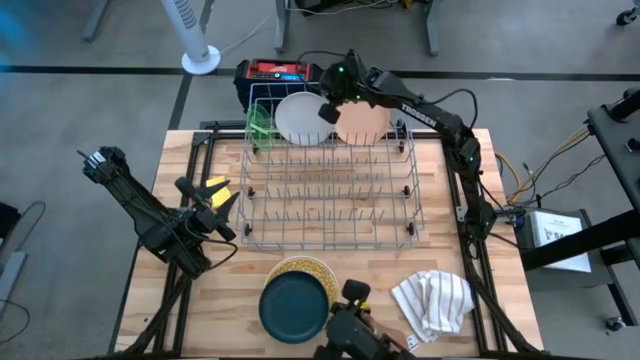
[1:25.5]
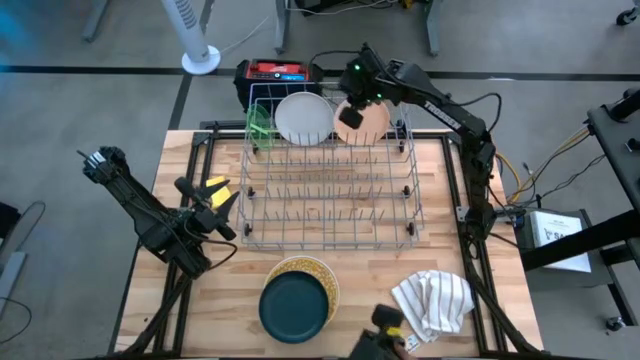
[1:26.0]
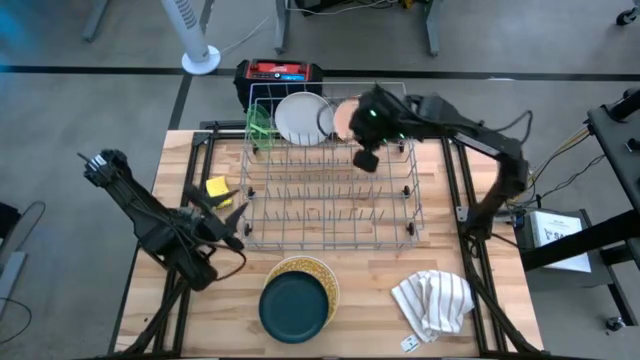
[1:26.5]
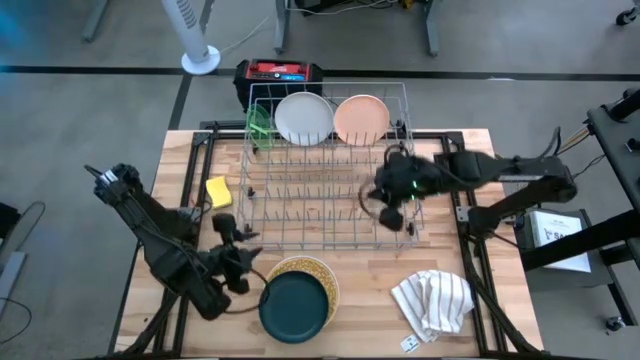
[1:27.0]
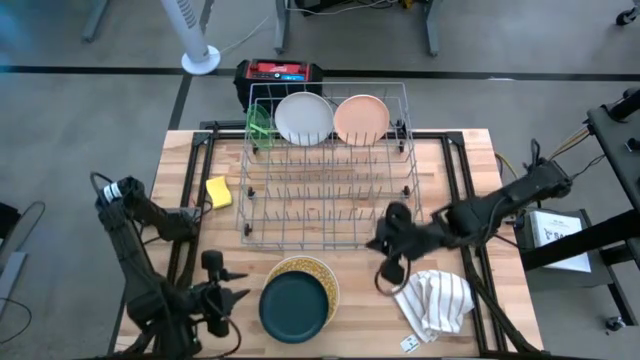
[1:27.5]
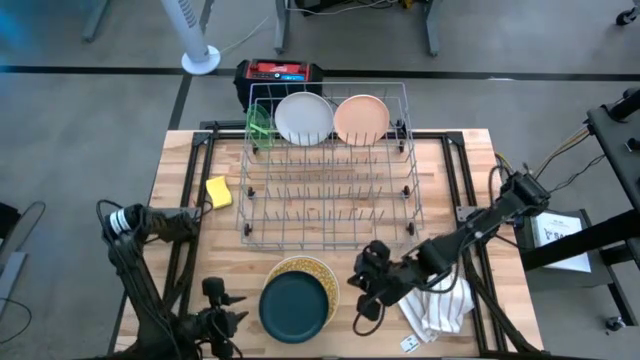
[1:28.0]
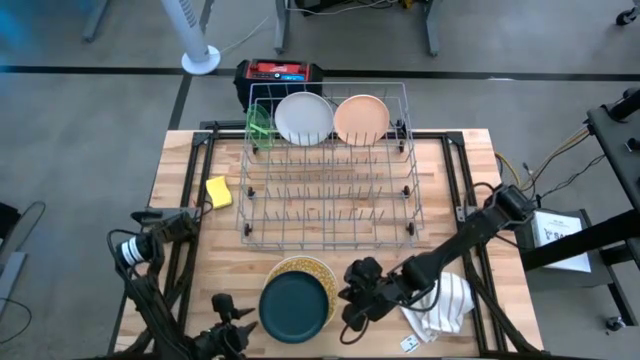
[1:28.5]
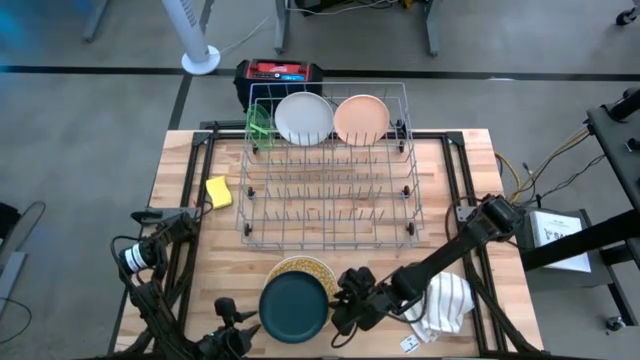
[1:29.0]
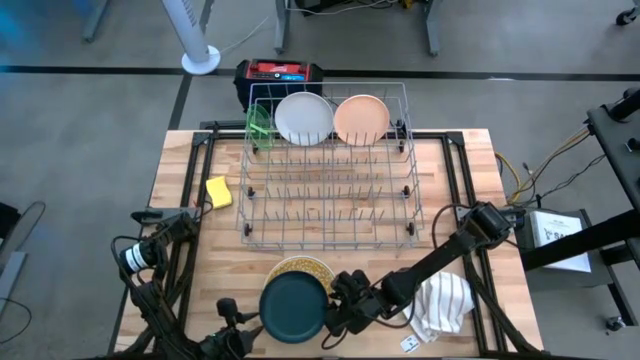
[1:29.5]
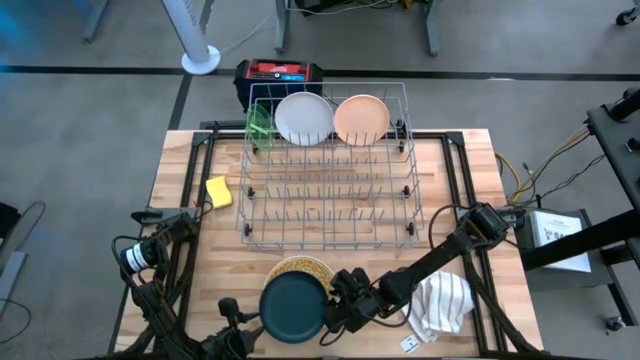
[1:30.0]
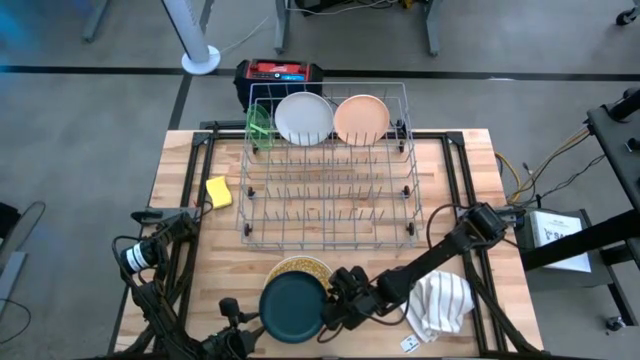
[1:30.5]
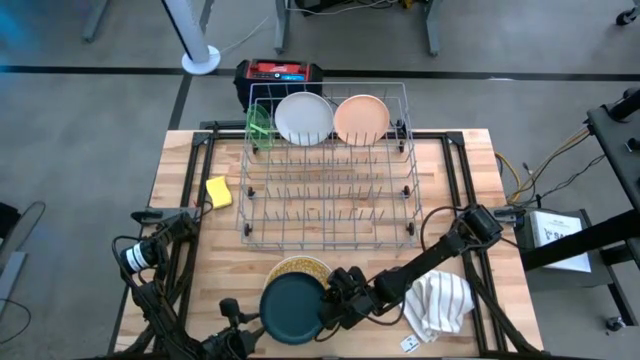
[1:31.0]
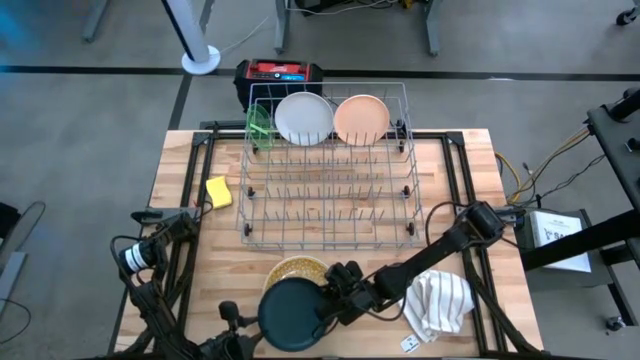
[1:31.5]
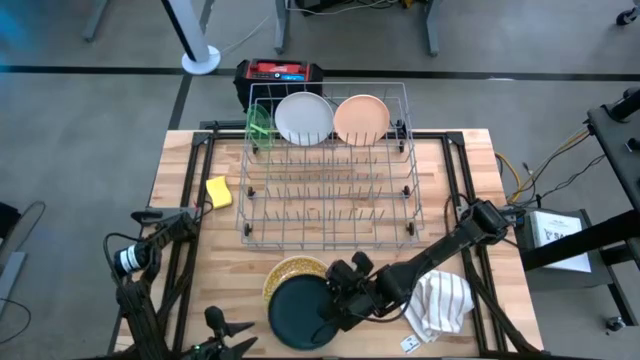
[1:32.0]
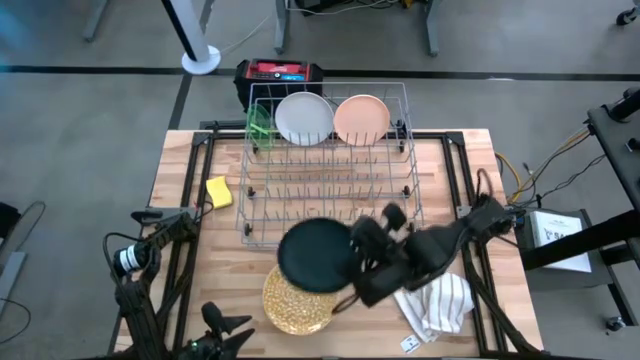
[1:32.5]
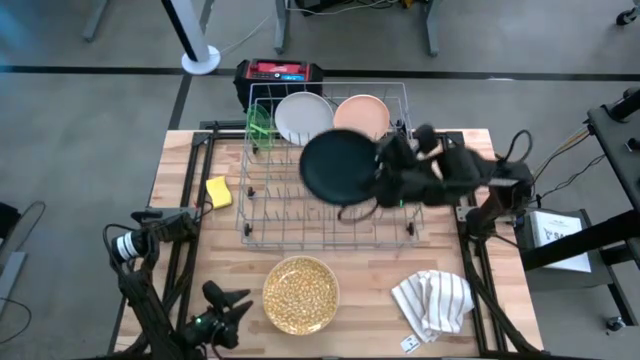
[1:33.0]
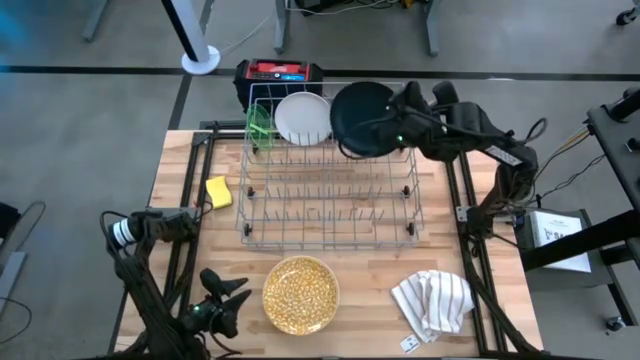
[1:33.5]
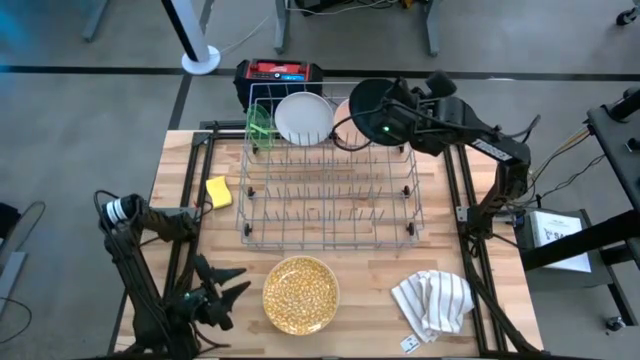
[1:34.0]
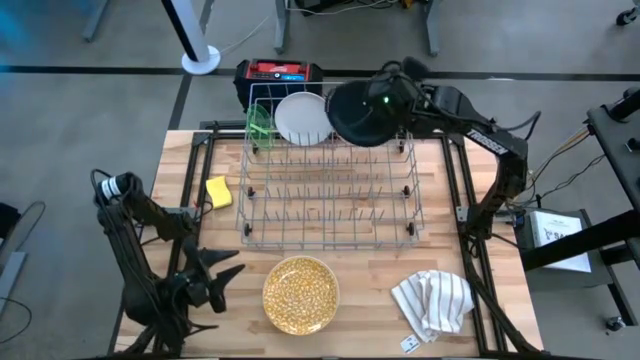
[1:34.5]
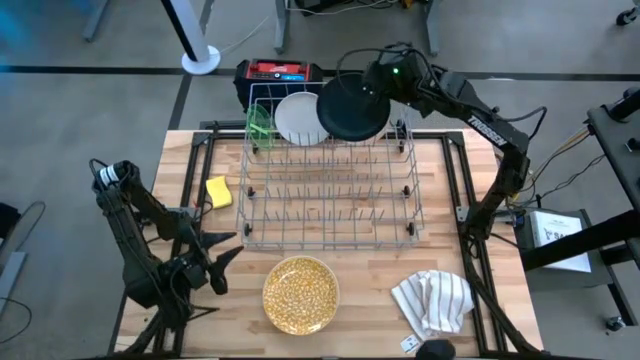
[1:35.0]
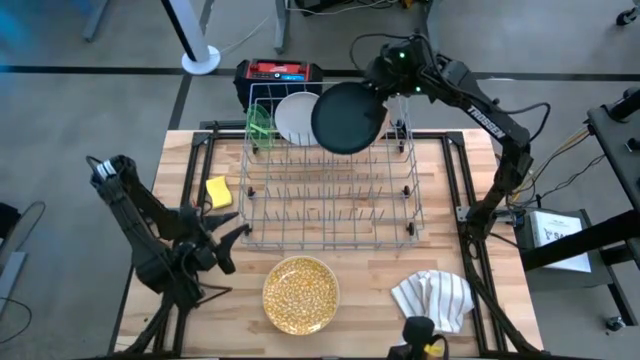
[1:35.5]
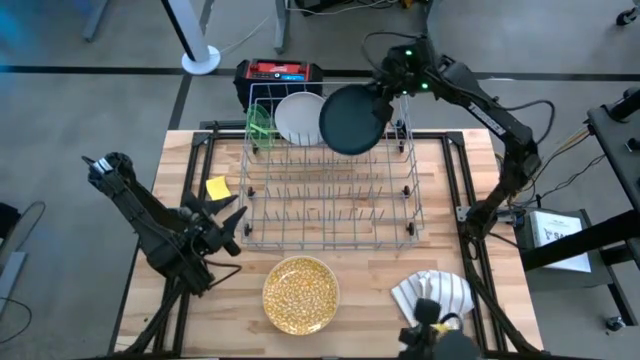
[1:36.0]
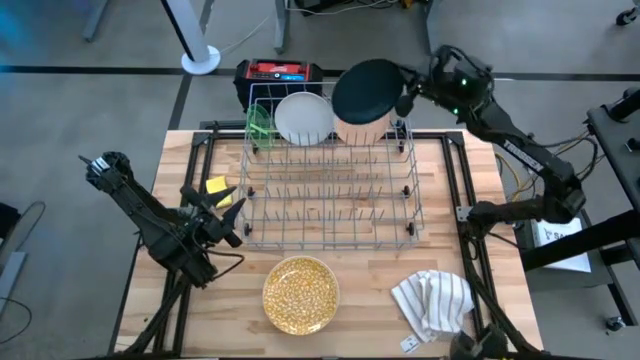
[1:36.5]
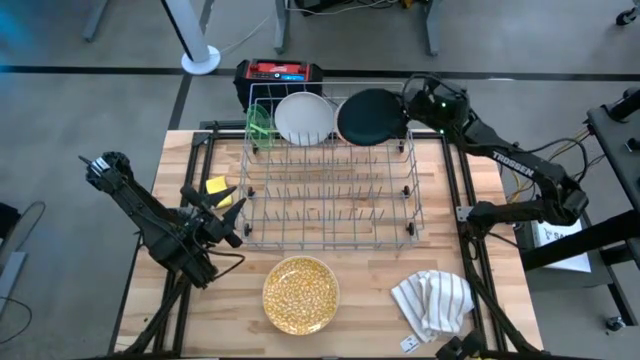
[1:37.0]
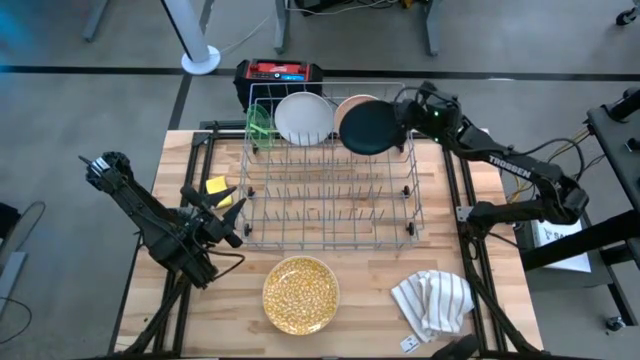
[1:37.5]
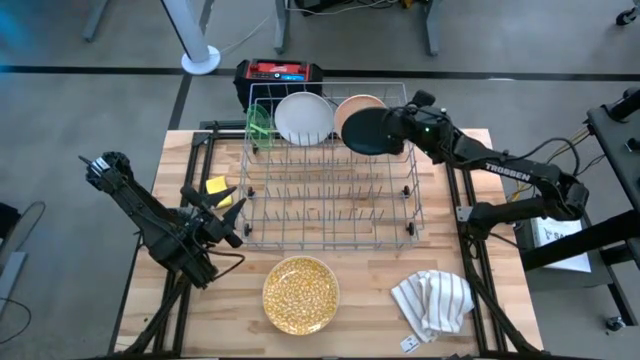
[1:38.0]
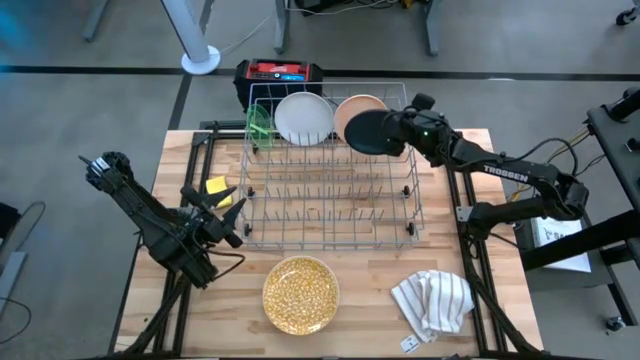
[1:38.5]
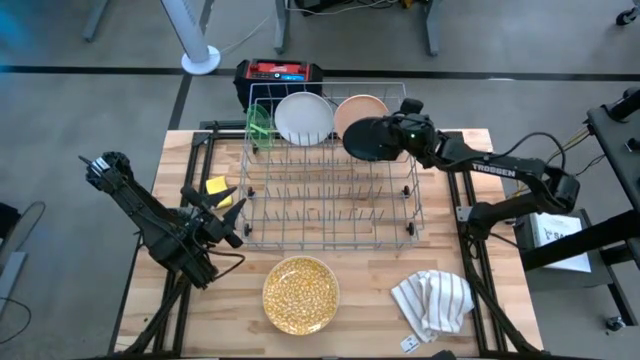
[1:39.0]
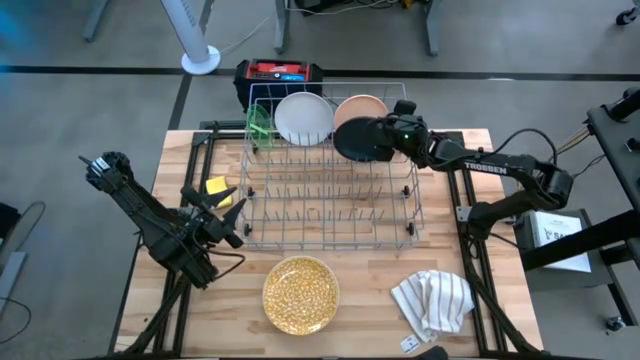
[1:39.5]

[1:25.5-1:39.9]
Task: Sort dishes
Put the black plate into the dish rack

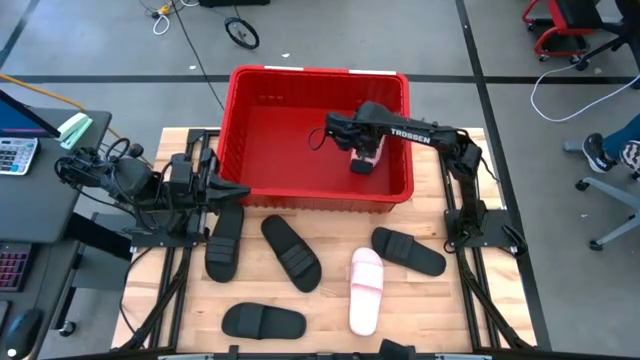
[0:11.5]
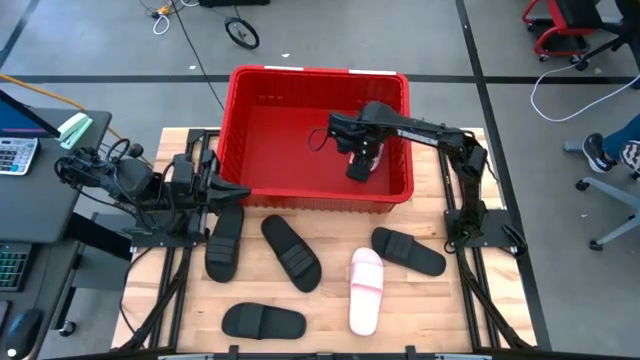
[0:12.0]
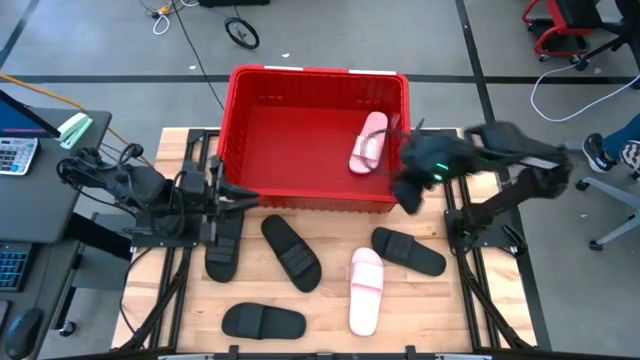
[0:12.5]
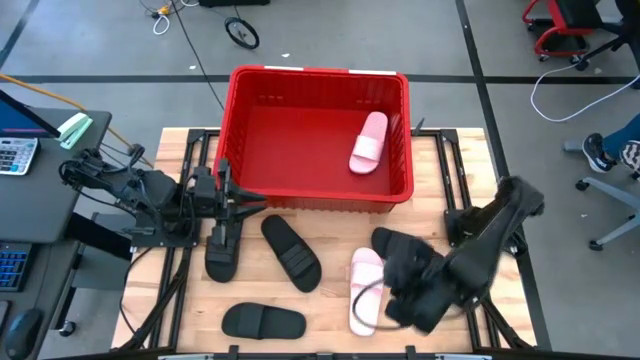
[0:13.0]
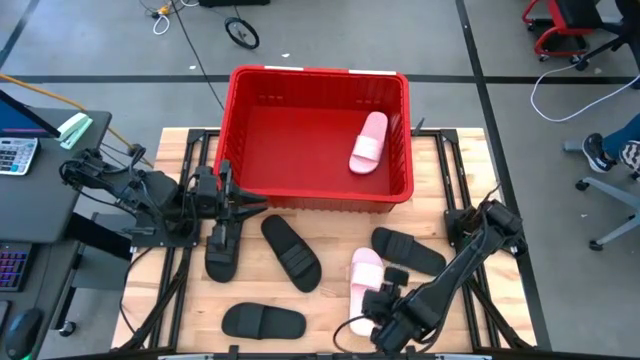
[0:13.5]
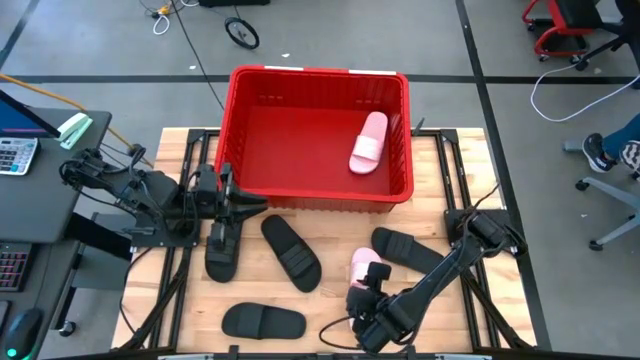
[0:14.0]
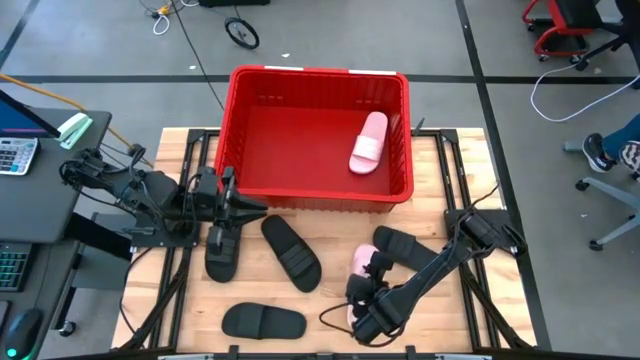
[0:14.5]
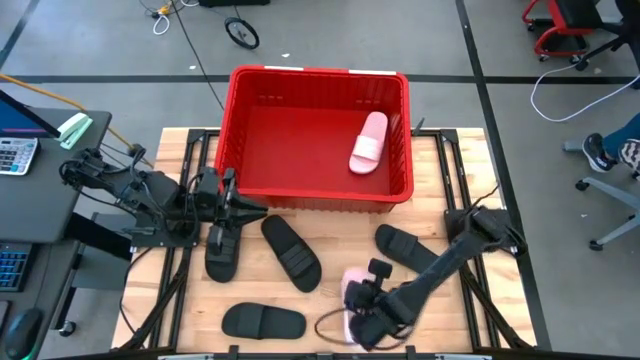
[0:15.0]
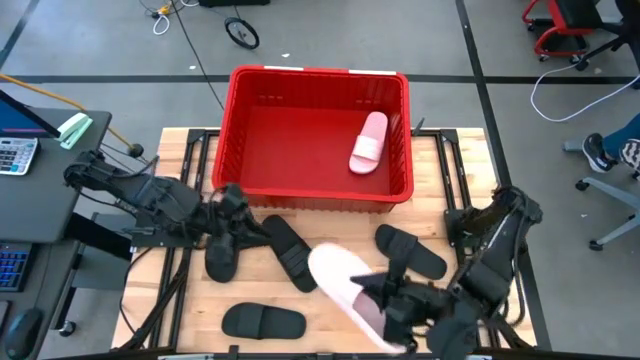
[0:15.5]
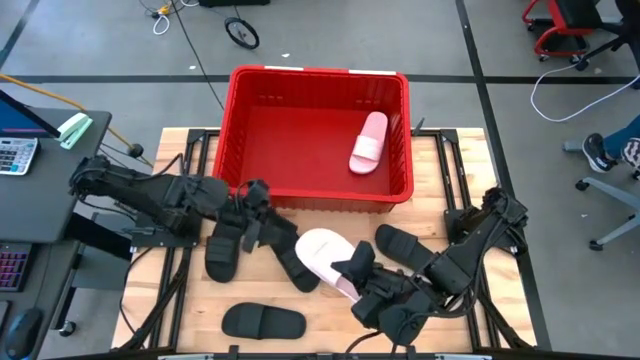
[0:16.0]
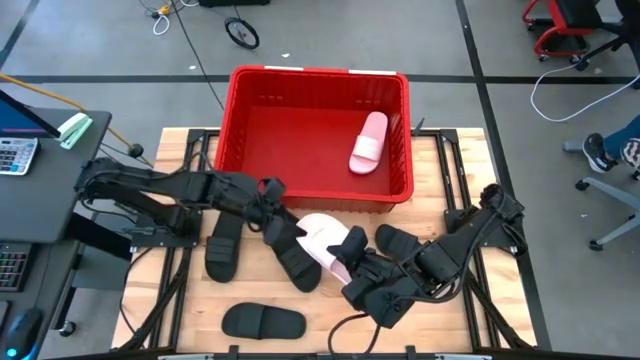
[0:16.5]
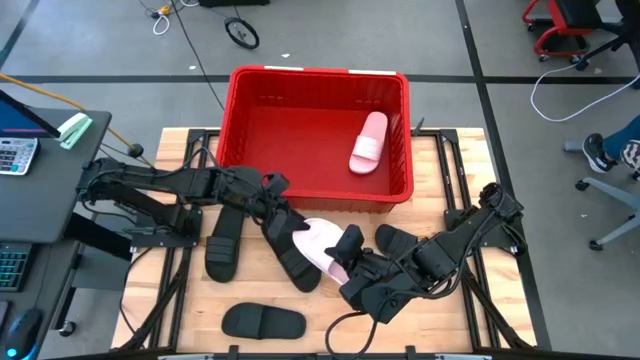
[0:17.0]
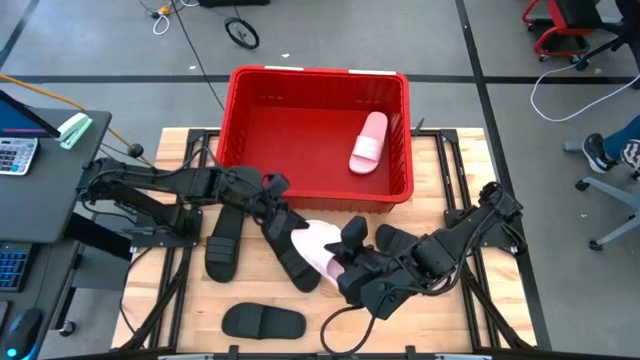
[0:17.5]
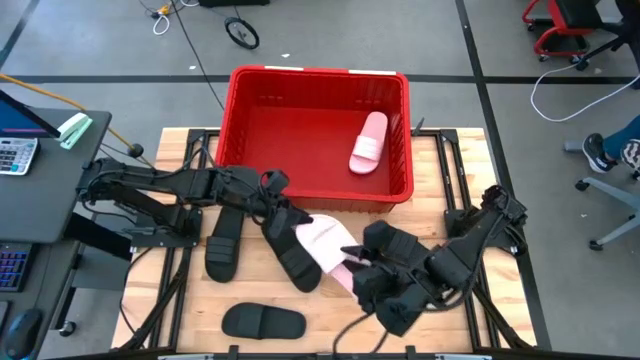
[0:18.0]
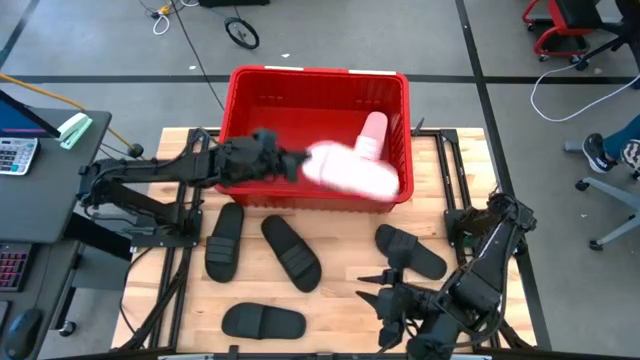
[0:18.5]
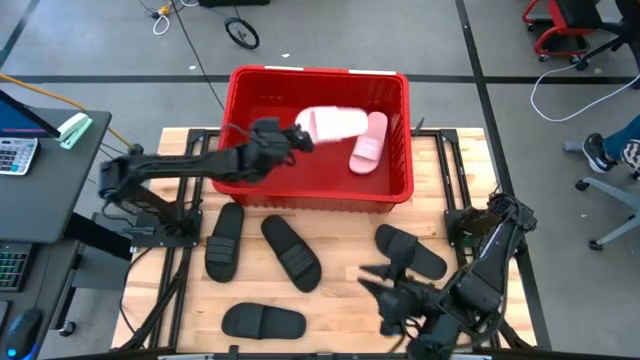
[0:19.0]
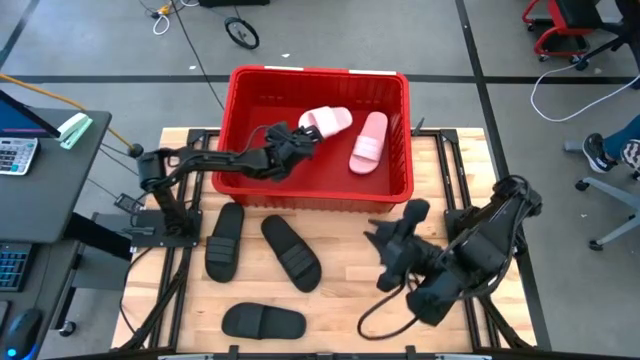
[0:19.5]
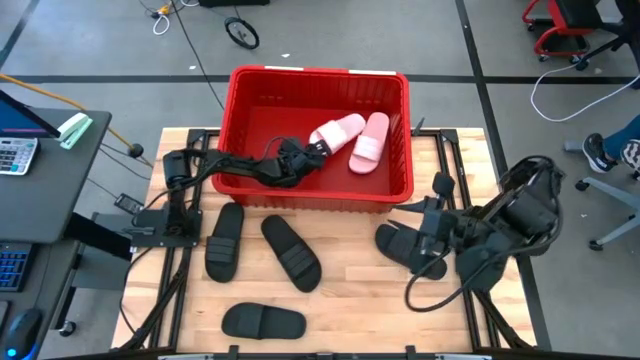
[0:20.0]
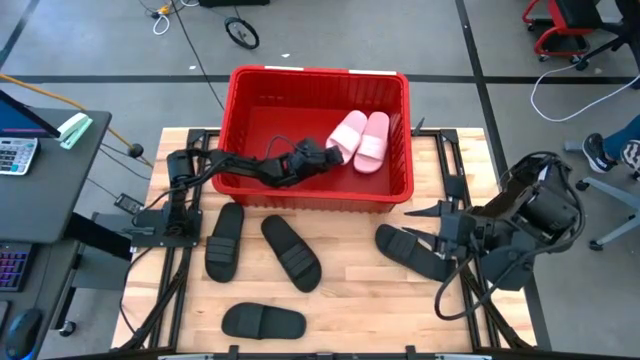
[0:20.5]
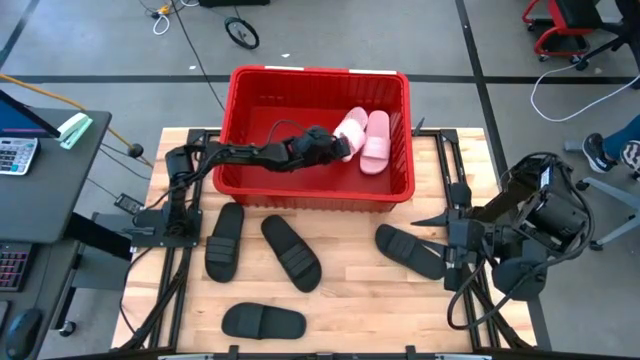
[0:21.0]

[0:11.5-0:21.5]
Task: Pick and place slides into bin
Put the pink slide into the red bin
